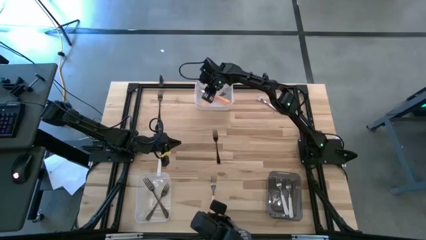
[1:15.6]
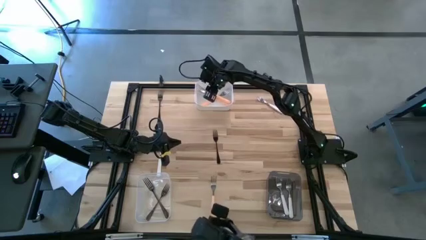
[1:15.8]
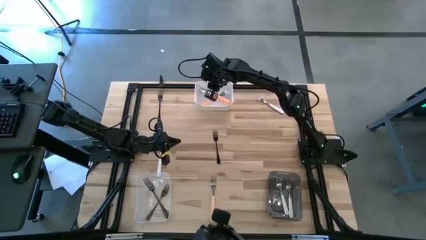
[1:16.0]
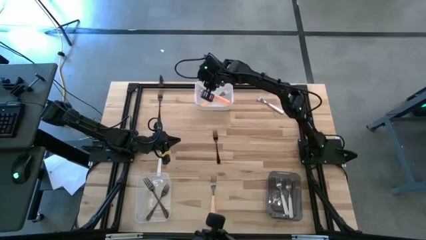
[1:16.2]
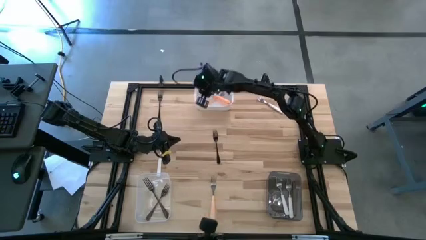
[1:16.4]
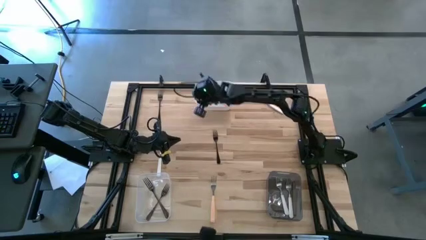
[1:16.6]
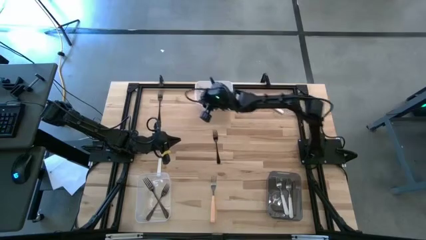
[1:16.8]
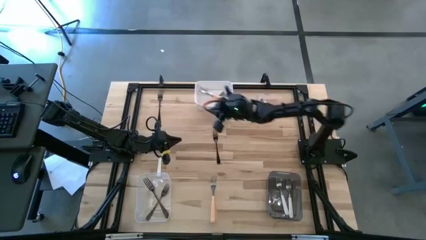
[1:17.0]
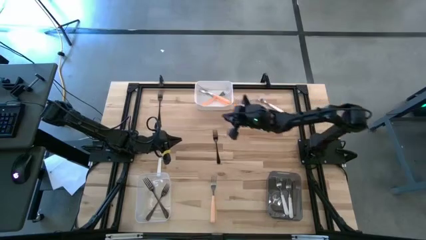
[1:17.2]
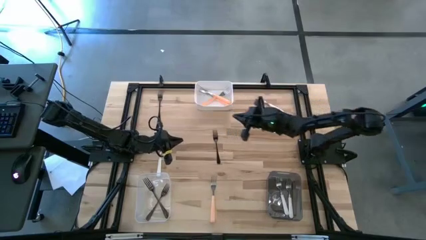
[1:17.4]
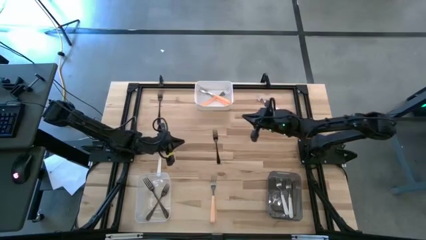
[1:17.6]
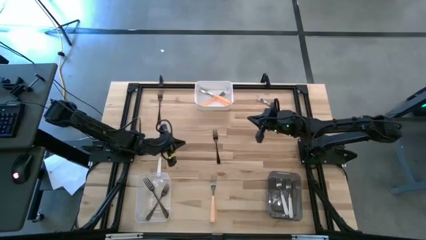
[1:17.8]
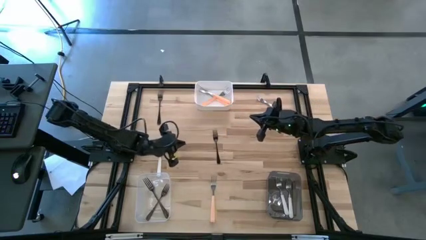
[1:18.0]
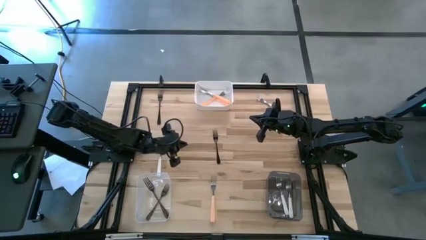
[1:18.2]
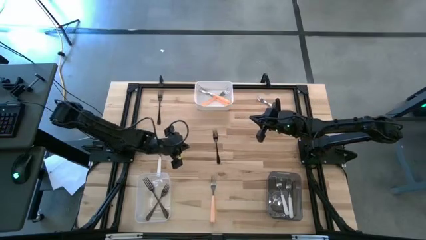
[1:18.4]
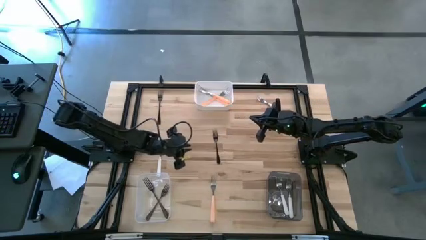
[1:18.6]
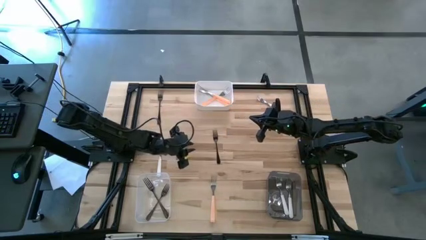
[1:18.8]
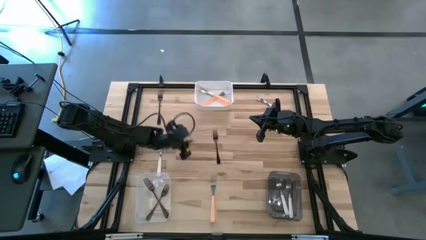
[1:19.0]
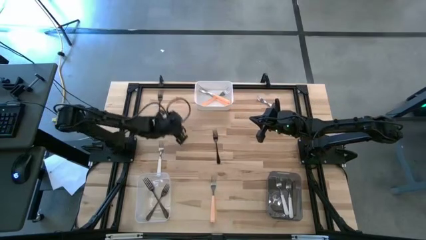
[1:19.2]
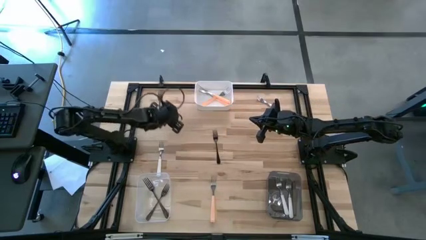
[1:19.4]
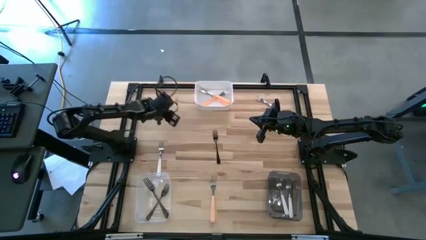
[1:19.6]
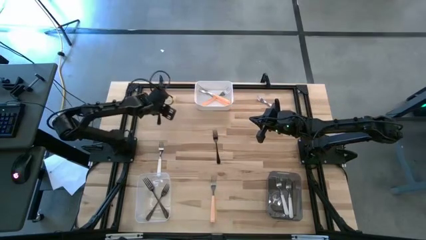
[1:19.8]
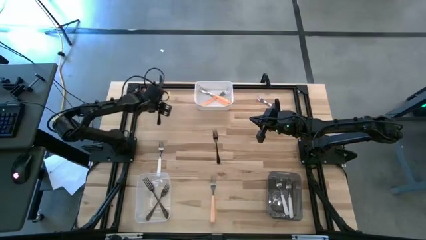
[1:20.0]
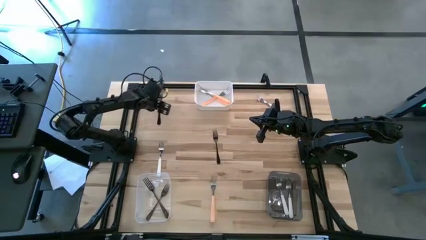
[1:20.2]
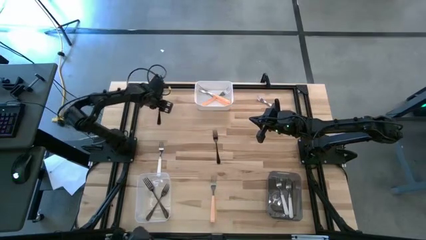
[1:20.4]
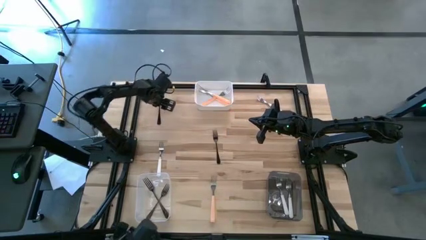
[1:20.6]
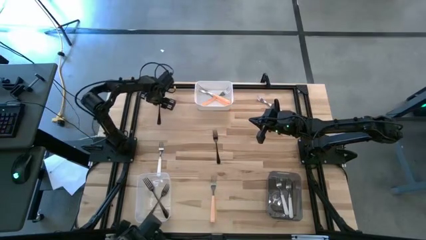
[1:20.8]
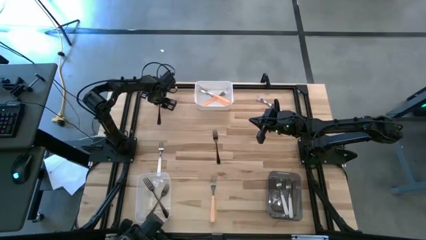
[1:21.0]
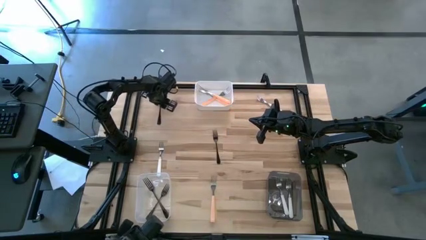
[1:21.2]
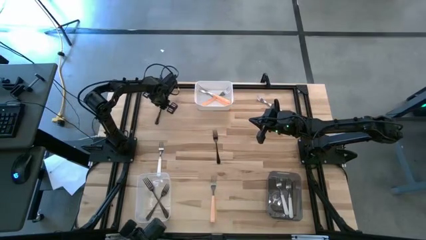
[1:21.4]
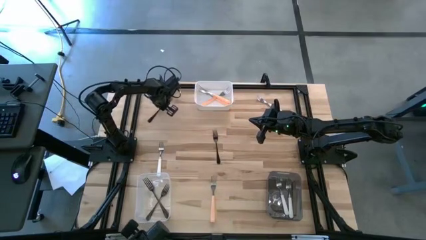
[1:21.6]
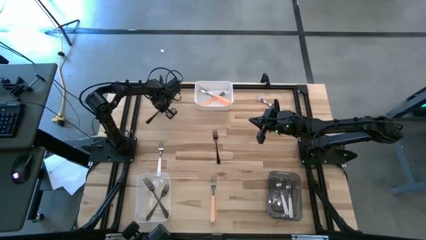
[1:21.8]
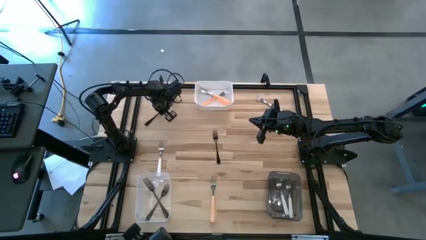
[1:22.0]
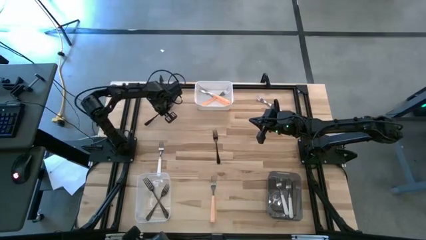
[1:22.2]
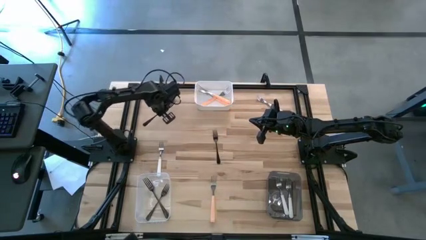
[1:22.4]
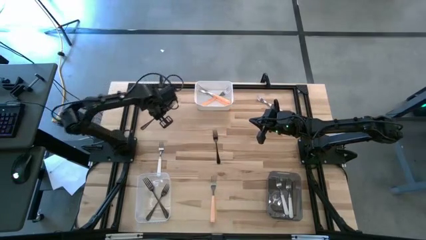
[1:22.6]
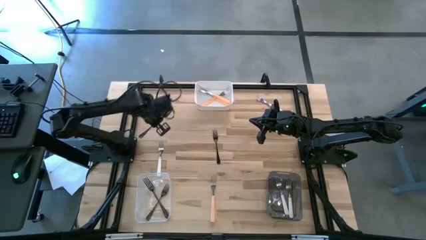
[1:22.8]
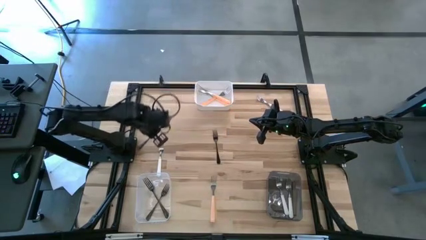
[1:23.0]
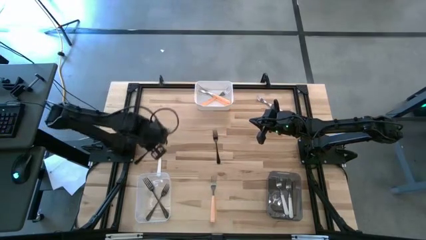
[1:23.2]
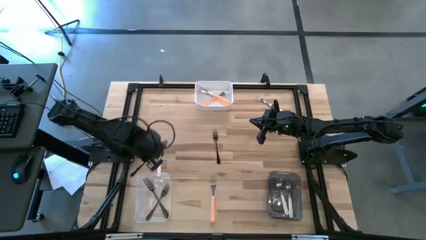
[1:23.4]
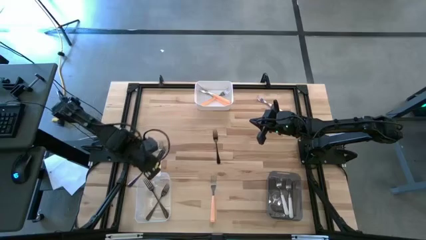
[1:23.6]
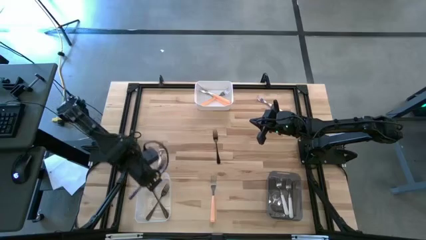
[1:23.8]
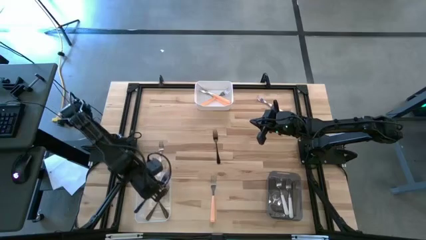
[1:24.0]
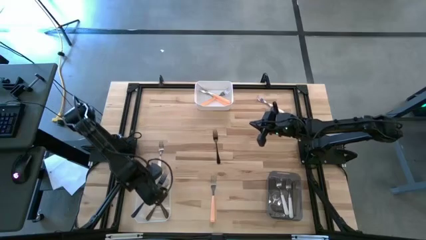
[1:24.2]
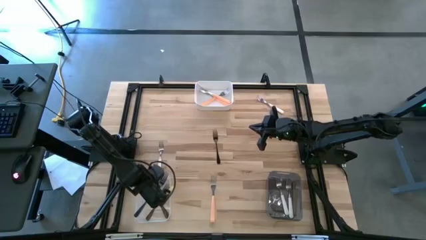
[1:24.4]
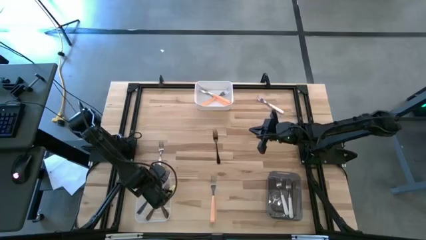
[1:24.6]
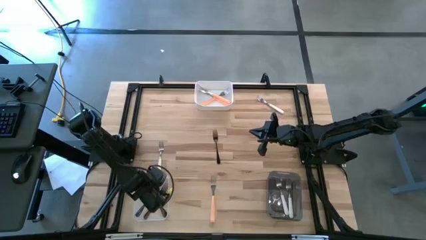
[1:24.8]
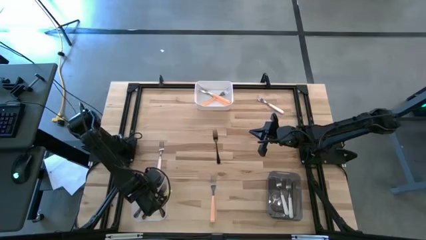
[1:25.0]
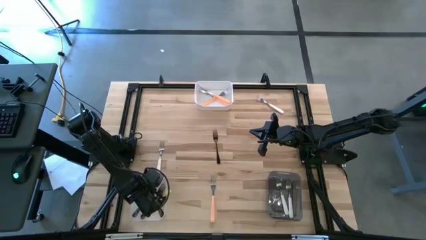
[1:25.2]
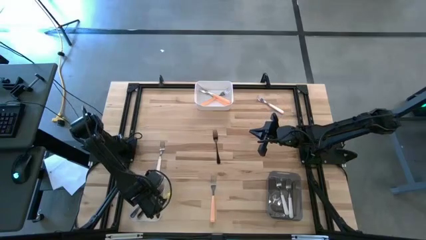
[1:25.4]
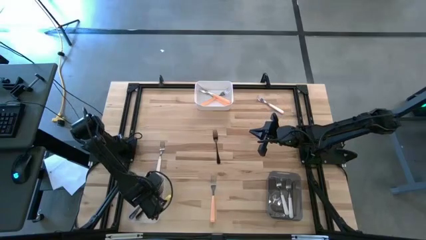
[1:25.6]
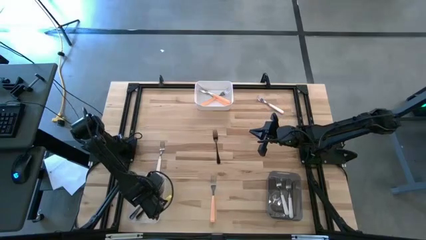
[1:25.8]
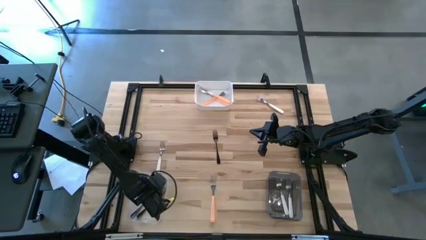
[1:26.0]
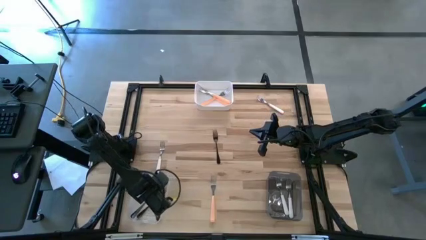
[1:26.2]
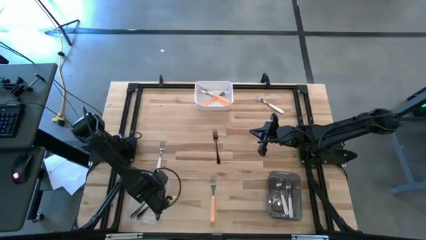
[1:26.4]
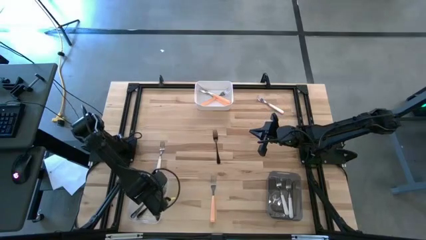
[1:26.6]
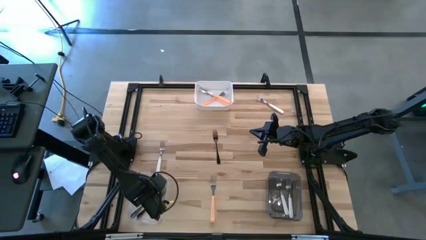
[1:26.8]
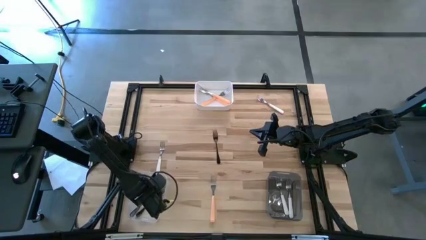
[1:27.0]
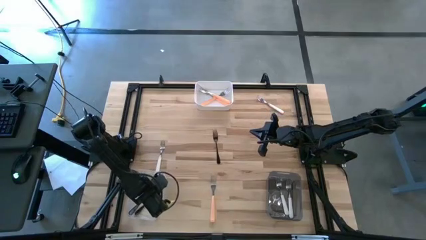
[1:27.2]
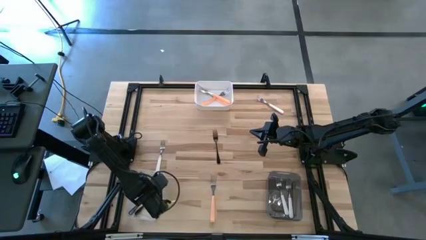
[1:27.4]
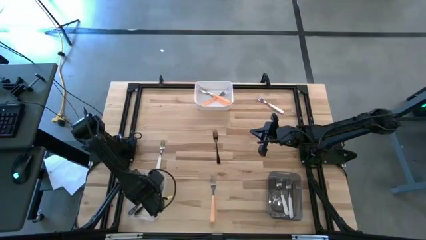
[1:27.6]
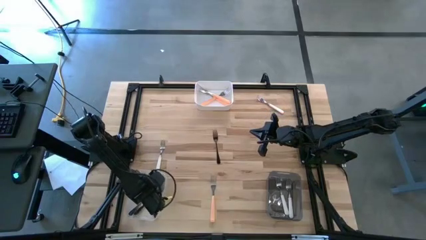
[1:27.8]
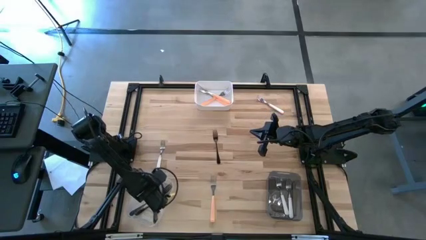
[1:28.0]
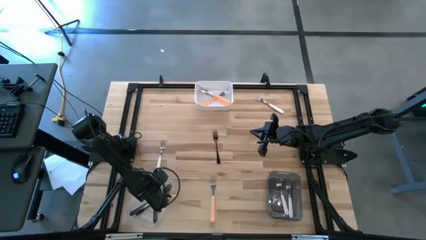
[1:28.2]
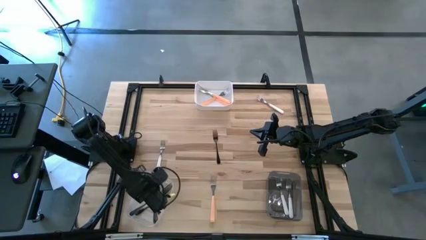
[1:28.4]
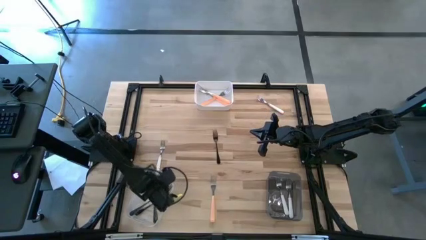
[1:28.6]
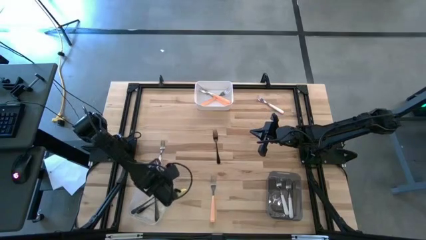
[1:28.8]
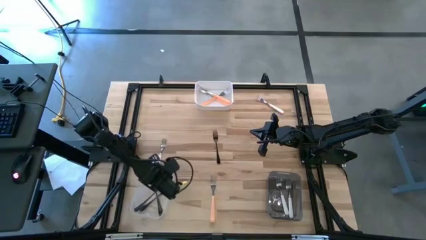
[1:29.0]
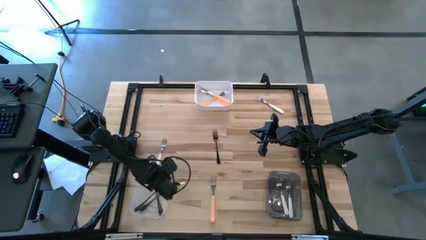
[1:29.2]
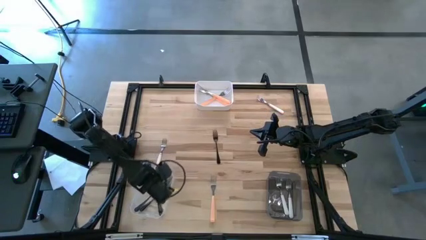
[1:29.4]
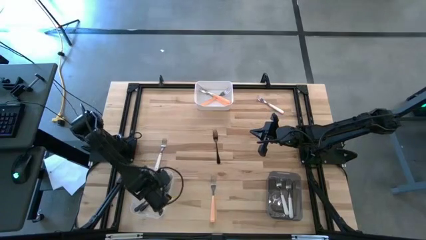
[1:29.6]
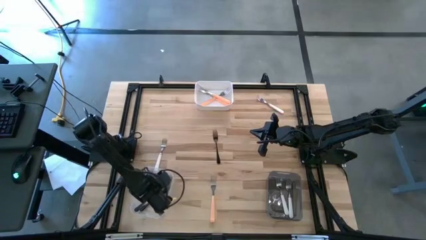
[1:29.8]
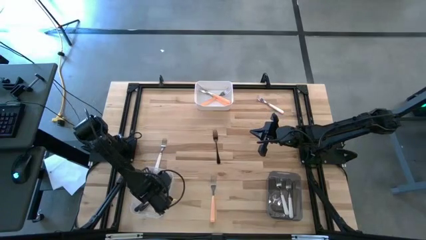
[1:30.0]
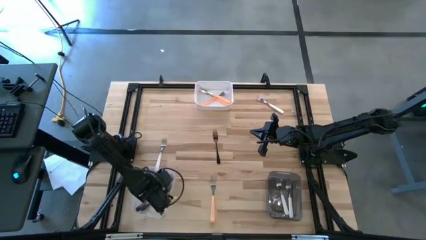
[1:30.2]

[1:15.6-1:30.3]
Task: Sort silverware by color (type)
Put the top silver fork into the transparent bin

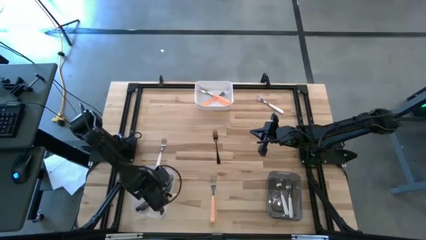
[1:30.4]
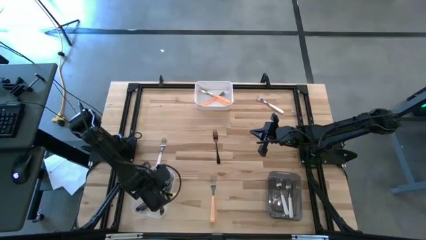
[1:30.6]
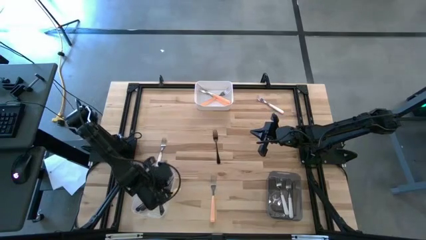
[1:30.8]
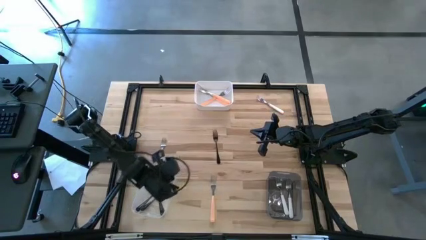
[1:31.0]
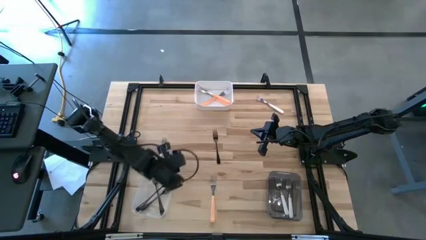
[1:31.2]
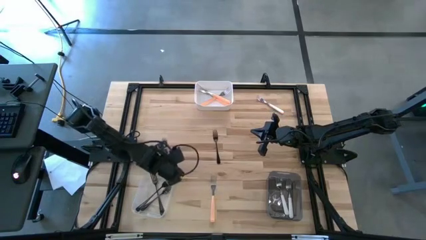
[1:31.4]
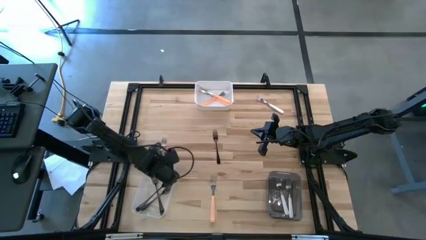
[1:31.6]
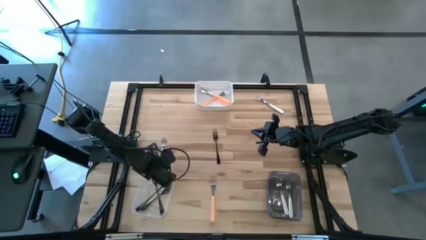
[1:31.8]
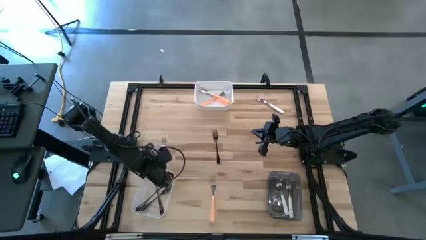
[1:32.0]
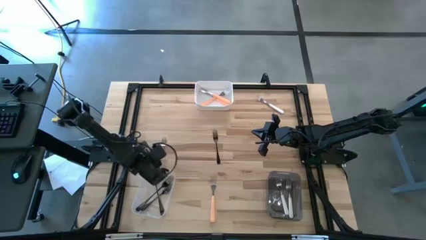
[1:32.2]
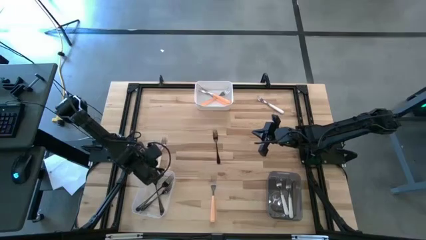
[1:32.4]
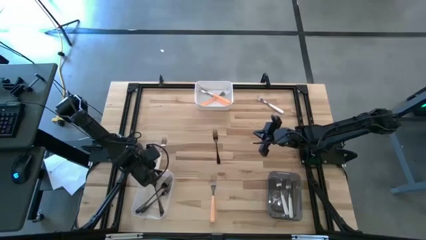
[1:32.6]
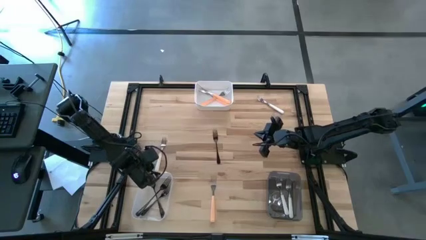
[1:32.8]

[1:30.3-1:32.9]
Adjust the white bin on the table
